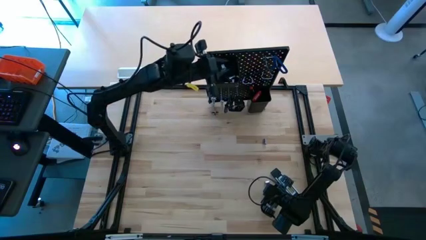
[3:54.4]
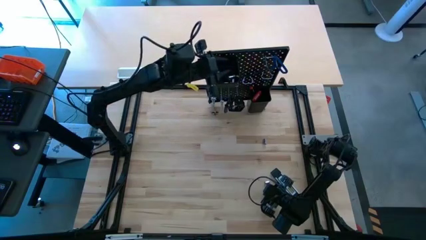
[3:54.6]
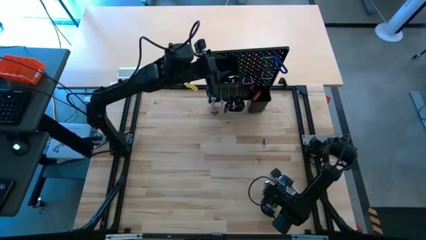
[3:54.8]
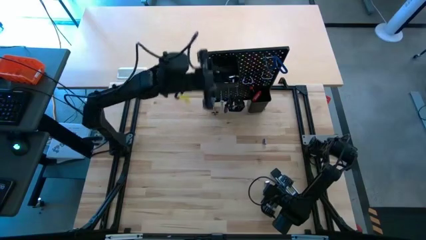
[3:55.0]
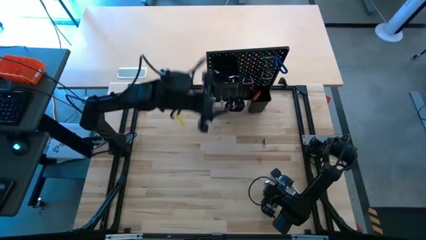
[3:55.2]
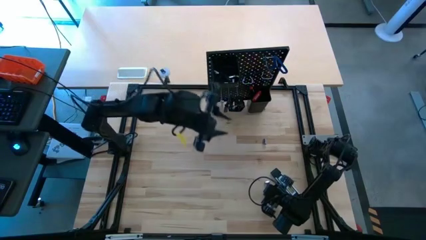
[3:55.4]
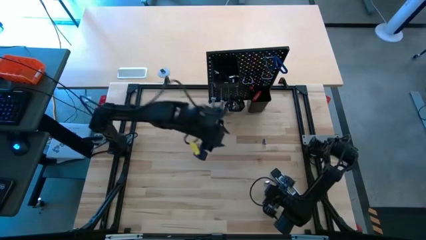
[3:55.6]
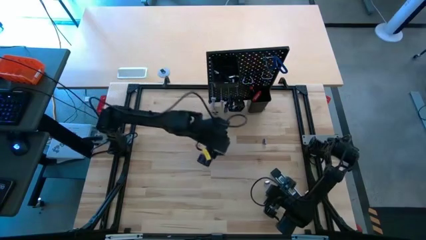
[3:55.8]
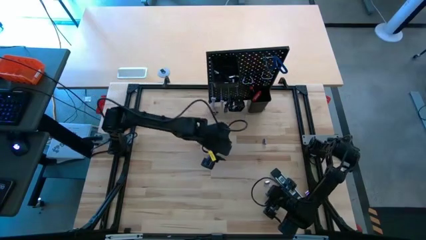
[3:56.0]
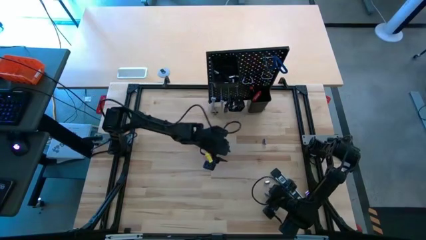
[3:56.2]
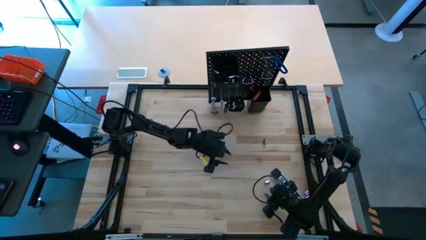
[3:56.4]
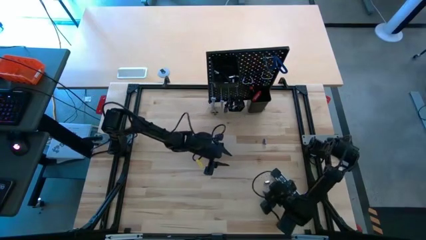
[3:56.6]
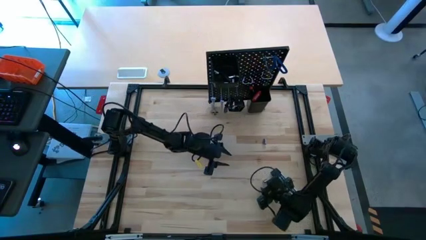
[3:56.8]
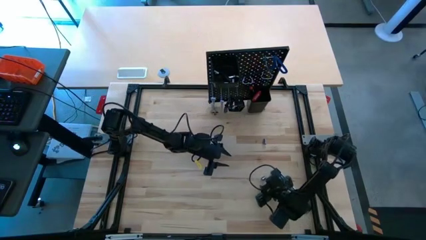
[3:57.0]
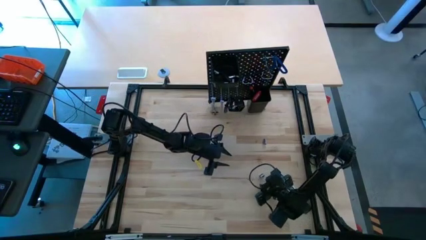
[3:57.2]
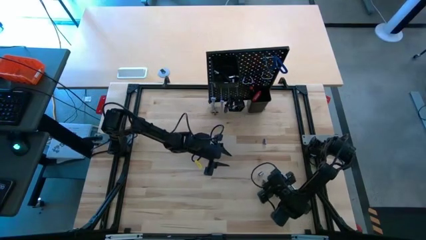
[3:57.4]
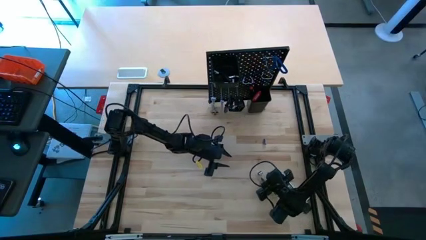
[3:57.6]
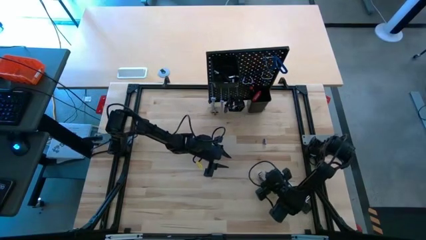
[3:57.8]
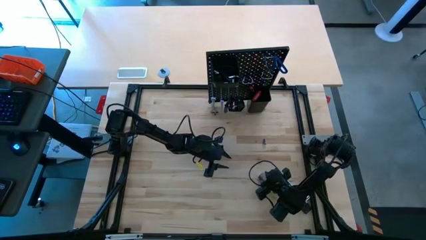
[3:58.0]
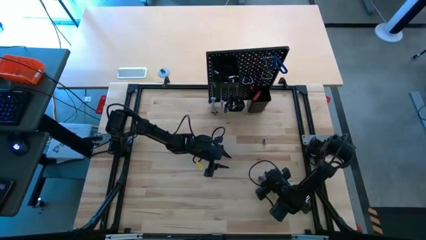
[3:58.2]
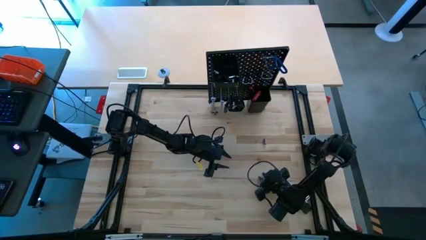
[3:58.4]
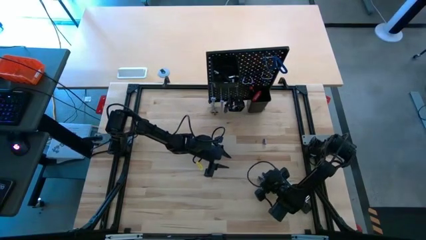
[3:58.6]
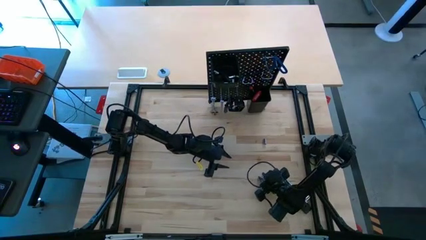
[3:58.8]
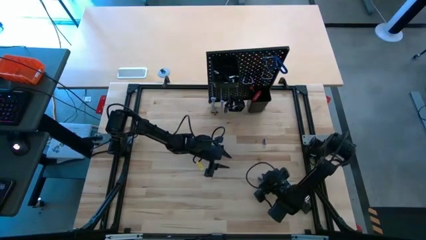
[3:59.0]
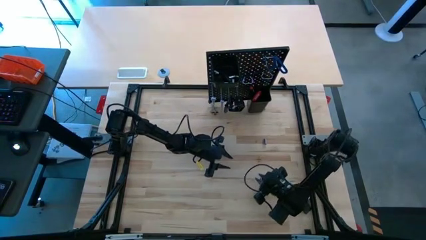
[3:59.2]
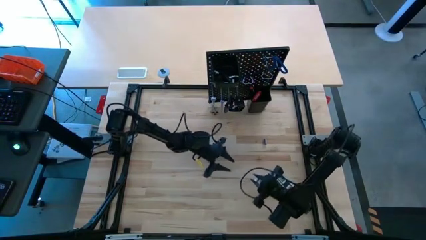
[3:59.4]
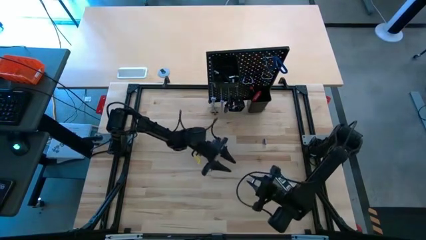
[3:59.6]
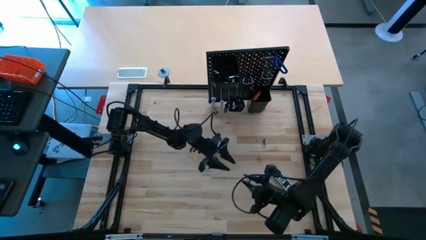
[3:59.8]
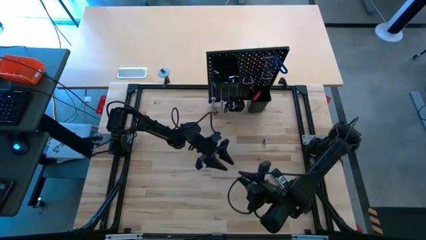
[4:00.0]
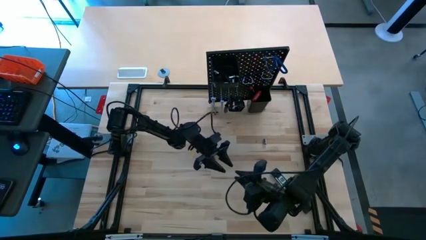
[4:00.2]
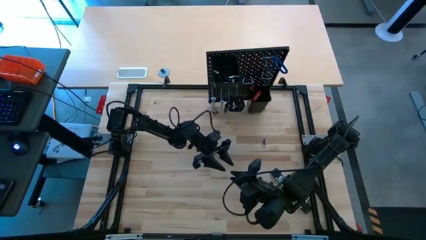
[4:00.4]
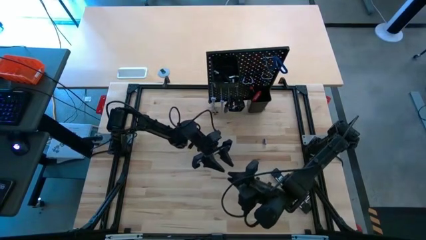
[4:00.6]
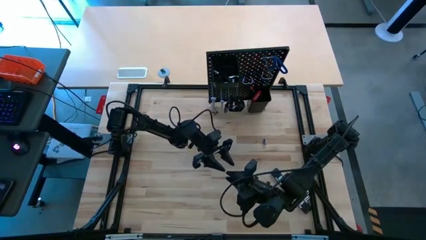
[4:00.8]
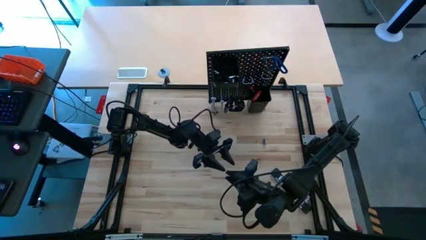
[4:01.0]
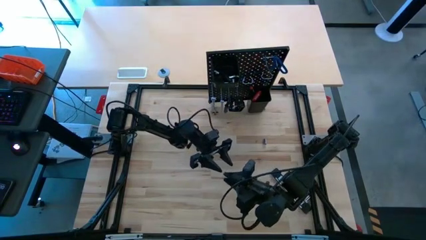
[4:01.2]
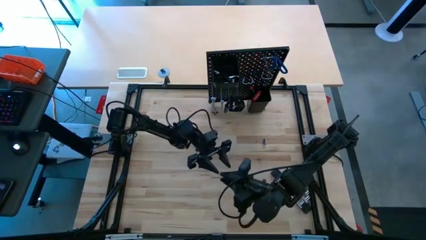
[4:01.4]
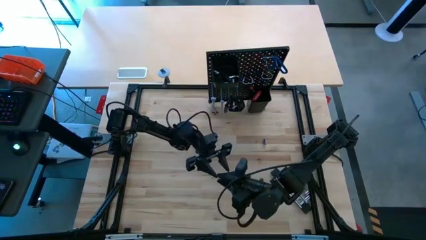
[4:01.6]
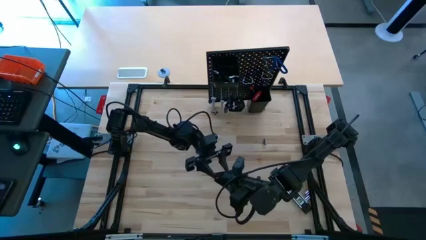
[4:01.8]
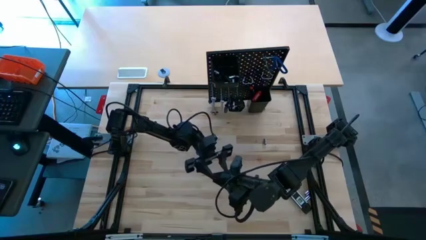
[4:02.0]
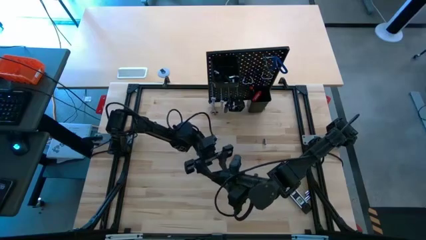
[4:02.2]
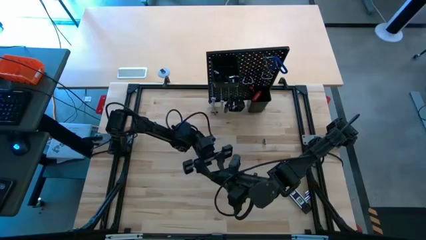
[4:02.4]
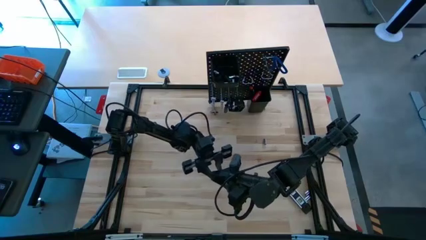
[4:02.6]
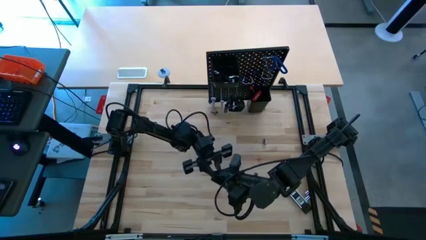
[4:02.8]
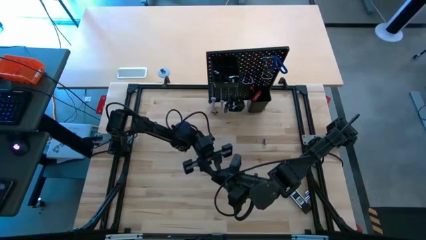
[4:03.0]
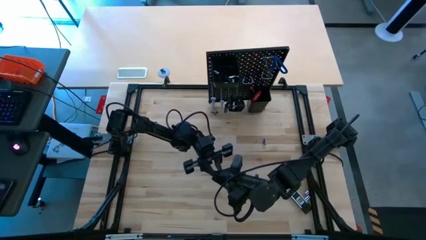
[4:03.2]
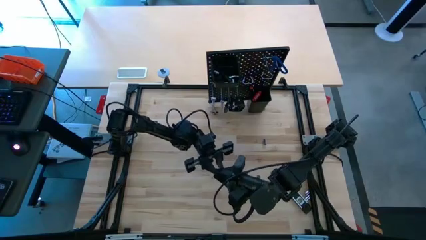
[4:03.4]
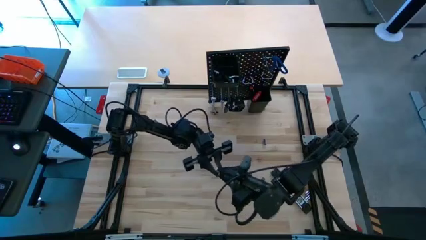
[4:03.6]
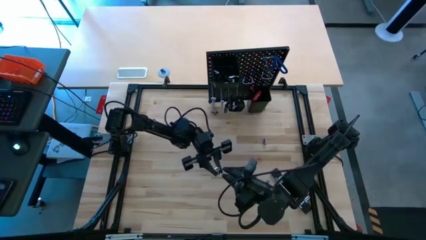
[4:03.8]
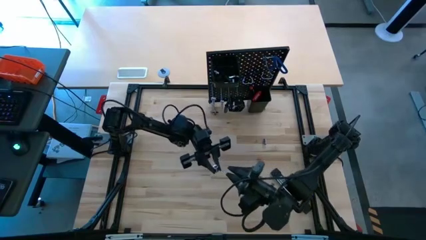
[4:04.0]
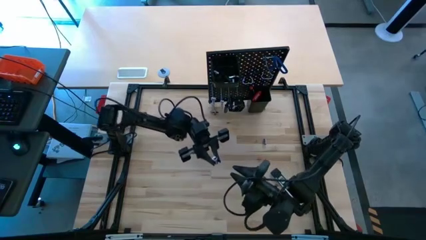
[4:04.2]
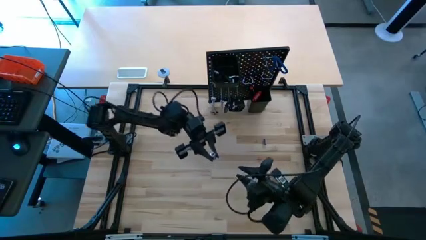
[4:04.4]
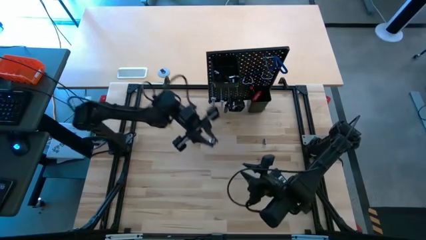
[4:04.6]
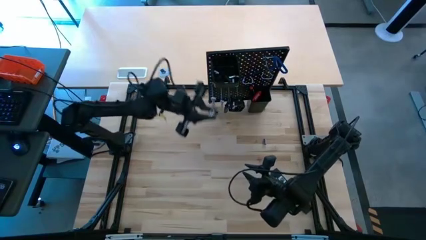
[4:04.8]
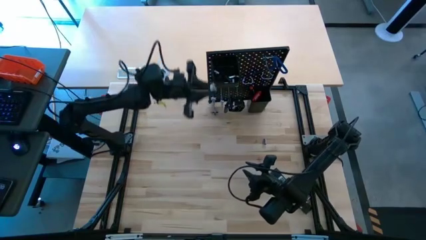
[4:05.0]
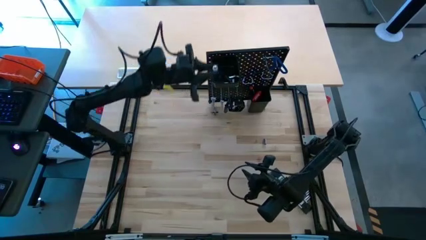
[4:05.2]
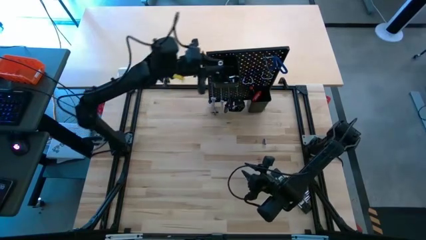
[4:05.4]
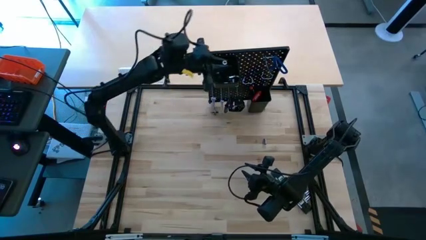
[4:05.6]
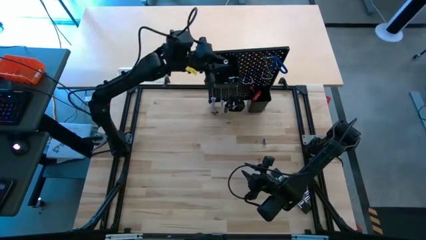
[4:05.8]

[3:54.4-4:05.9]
Task: Hang tools onto peg board
Put the silver socket into the top black bin on the peg board

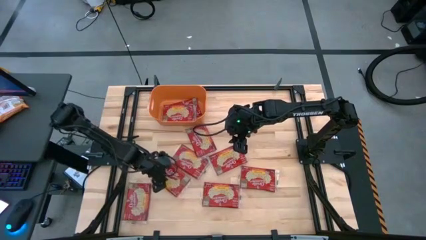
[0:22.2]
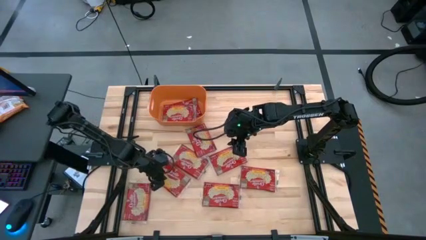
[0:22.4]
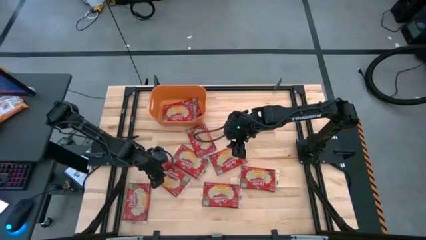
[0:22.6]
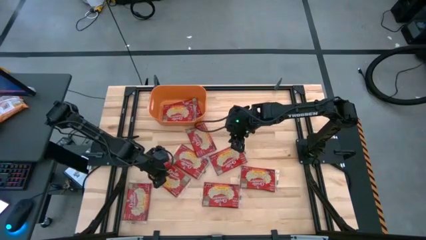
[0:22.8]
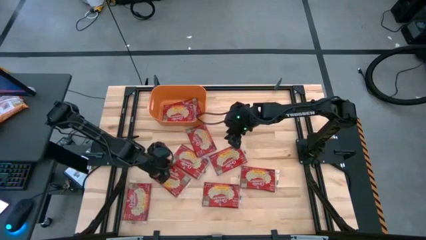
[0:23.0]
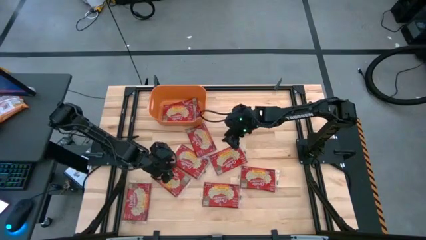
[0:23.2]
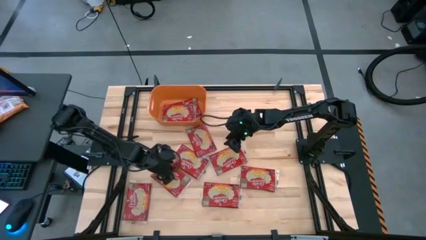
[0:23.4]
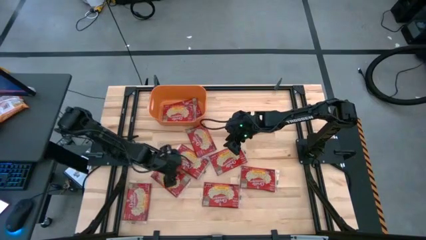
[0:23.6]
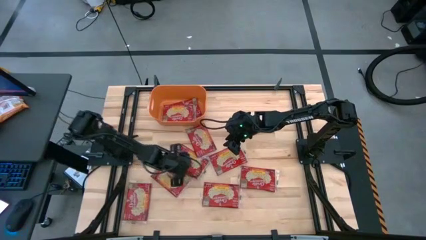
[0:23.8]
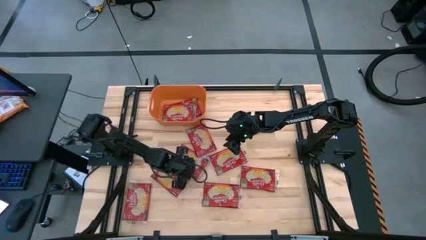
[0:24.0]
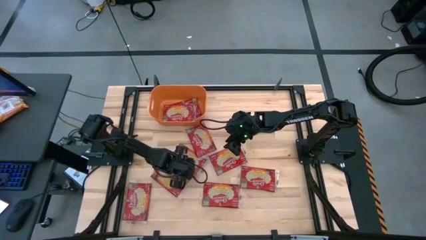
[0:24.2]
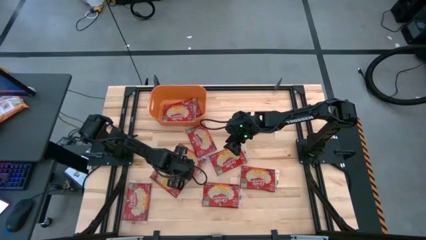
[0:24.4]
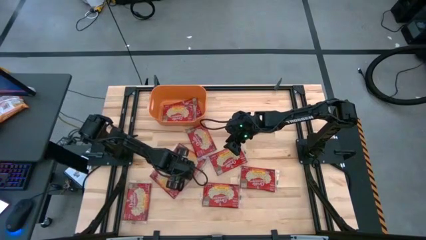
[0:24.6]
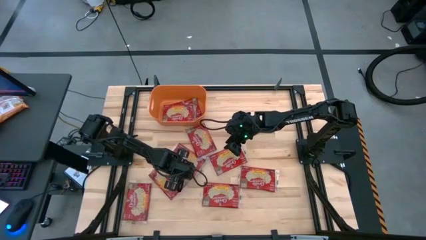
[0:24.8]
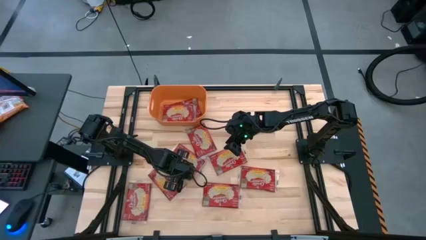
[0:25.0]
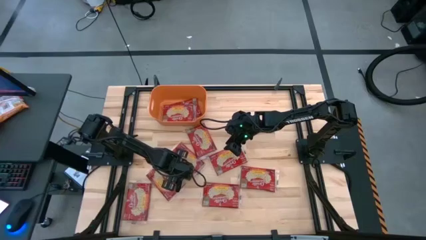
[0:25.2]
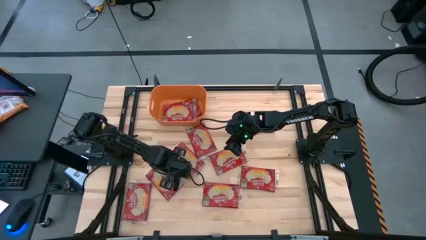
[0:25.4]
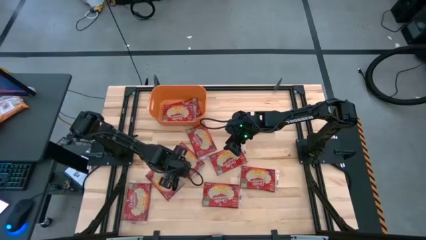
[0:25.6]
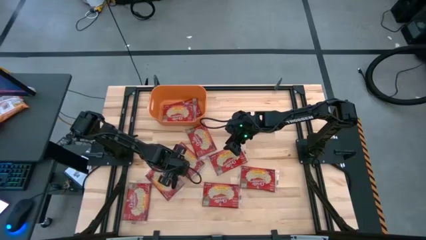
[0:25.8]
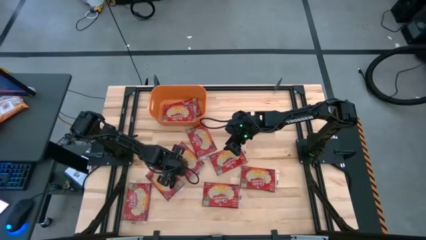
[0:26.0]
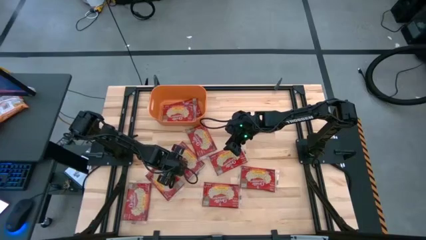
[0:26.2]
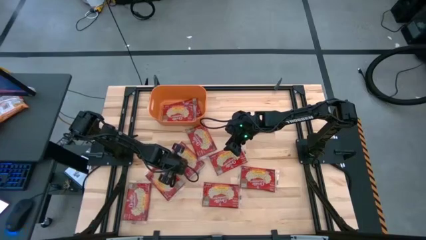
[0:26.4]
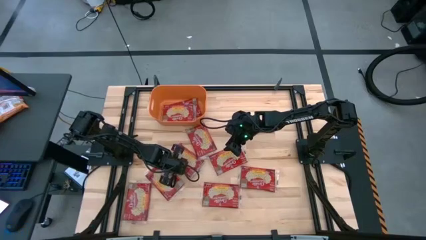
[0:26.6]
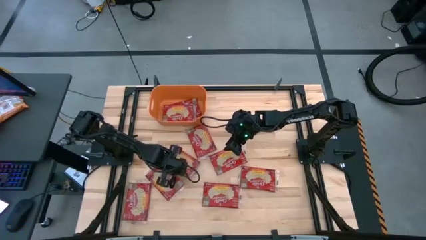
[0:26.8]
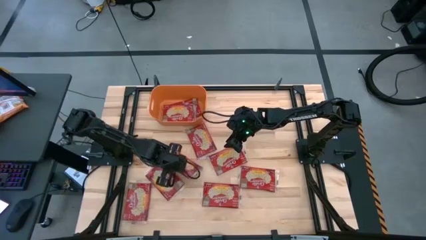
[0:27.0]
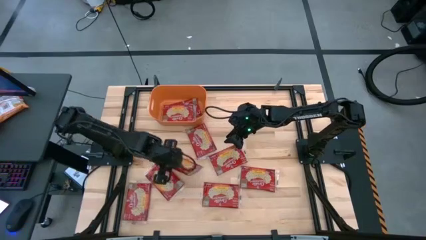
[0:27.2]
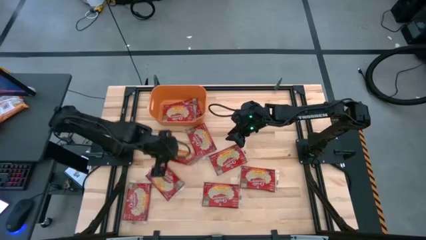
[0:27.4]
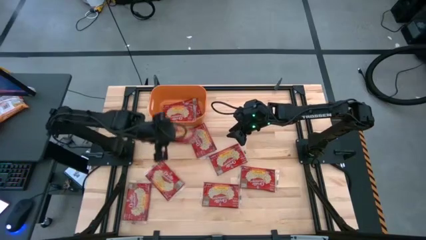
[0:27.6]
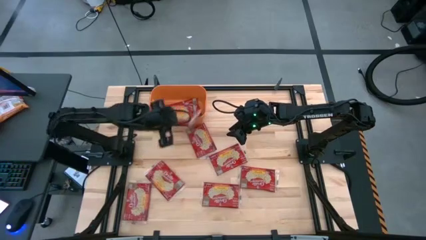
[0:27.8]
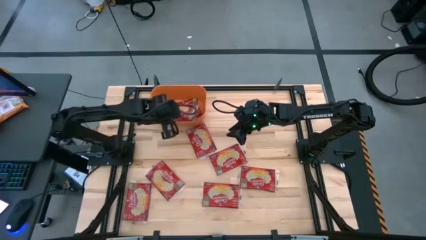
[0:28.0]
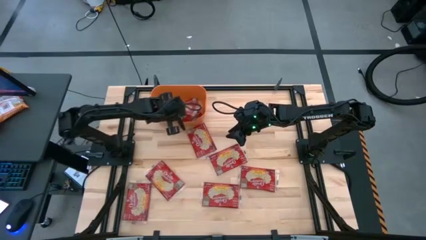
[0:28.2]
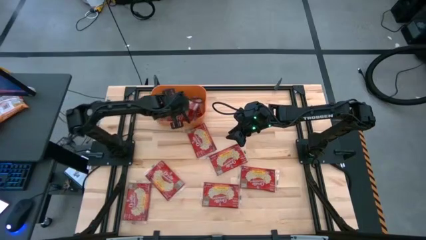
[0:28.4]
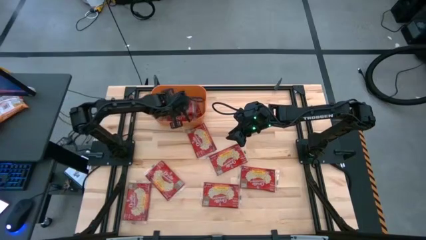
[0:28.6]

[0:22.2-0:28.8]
Task: Sort popcorn bags into baskets
Put the red popcorn bag into the orange bin
